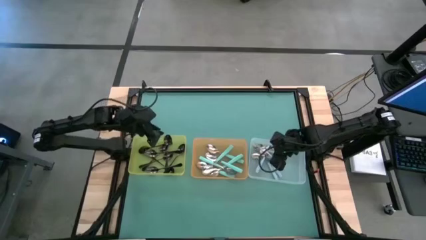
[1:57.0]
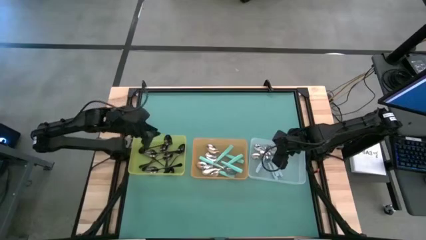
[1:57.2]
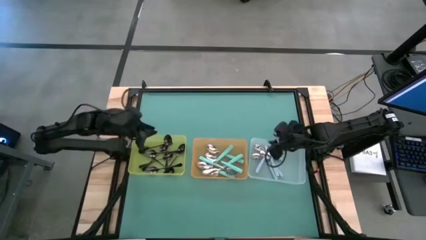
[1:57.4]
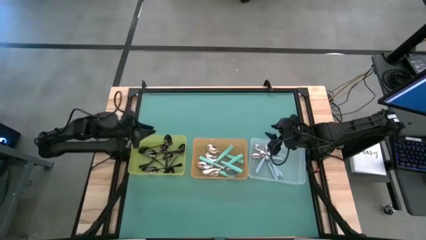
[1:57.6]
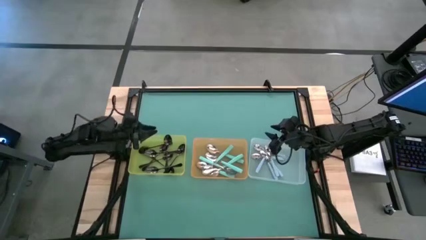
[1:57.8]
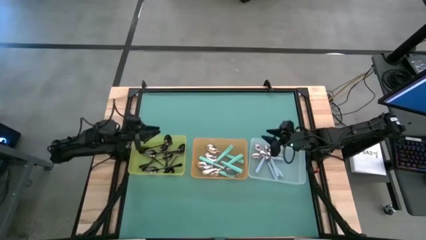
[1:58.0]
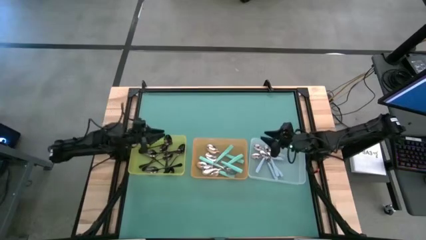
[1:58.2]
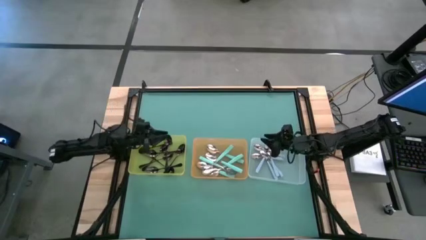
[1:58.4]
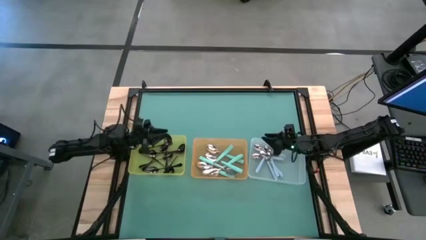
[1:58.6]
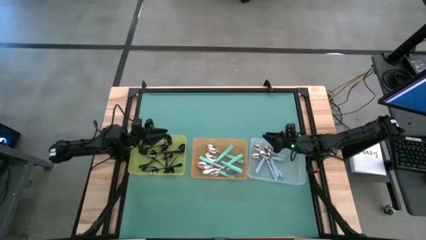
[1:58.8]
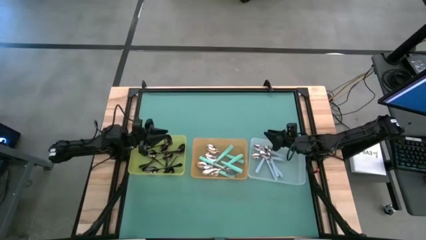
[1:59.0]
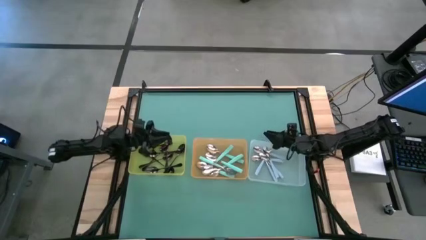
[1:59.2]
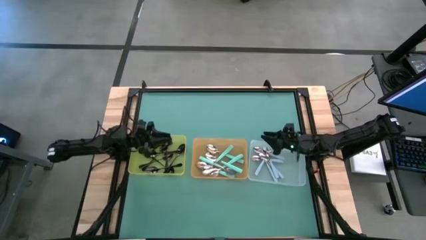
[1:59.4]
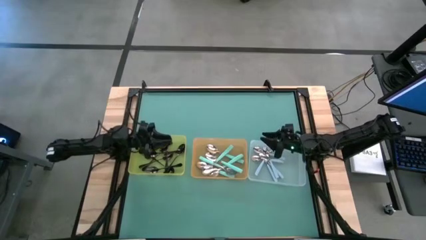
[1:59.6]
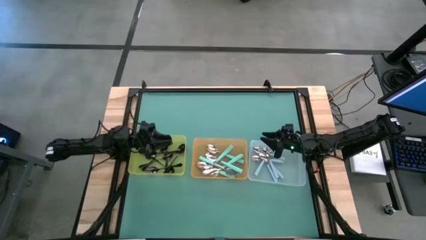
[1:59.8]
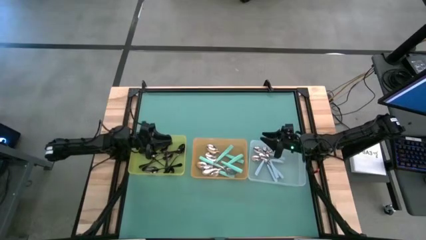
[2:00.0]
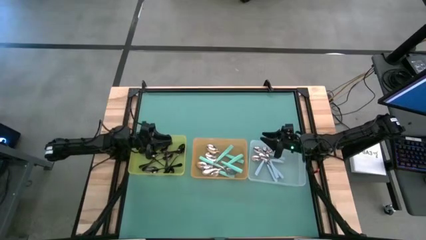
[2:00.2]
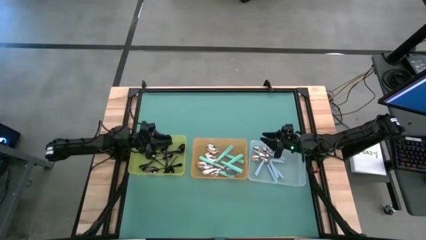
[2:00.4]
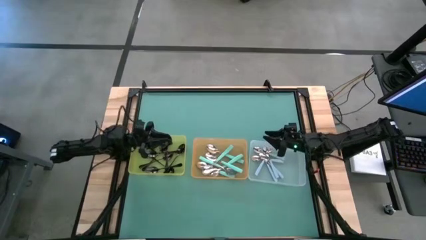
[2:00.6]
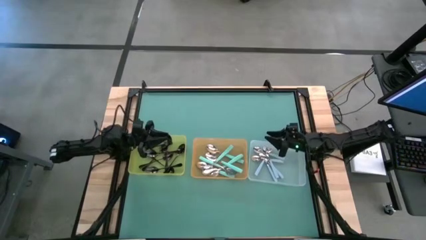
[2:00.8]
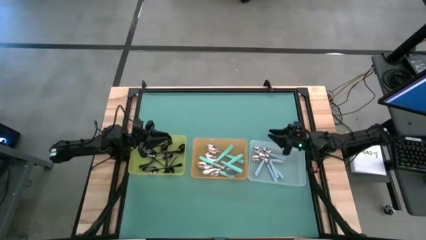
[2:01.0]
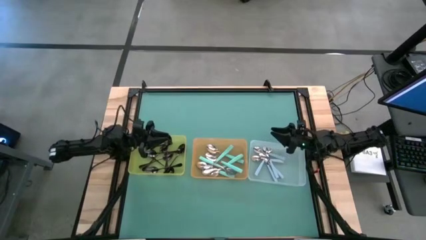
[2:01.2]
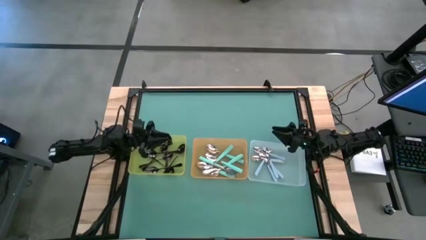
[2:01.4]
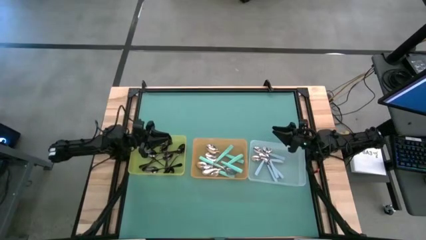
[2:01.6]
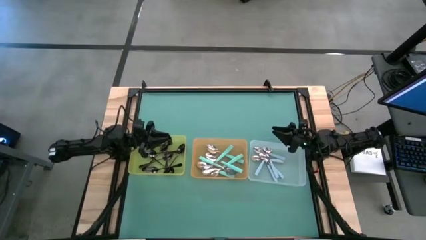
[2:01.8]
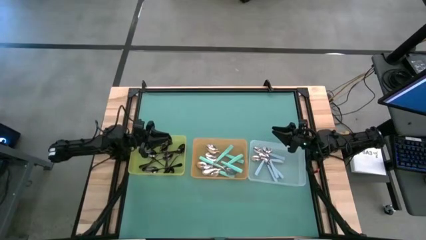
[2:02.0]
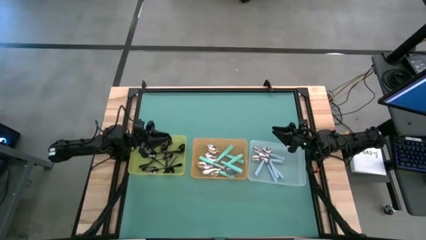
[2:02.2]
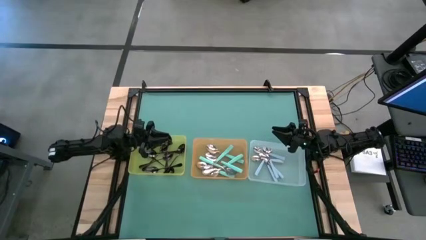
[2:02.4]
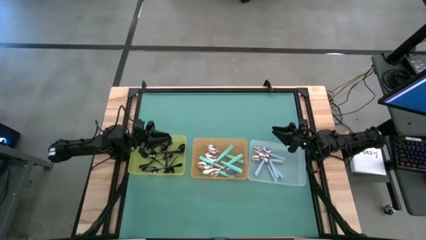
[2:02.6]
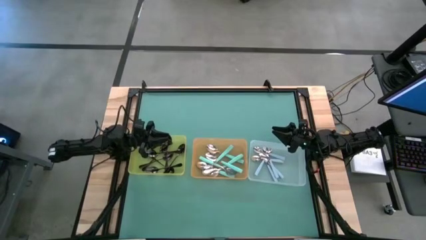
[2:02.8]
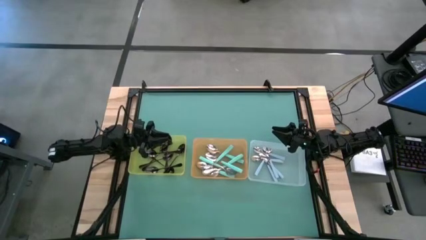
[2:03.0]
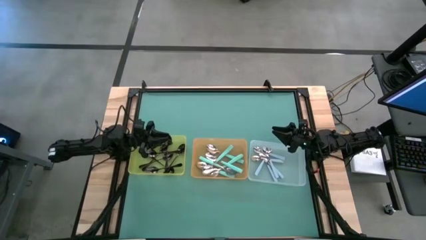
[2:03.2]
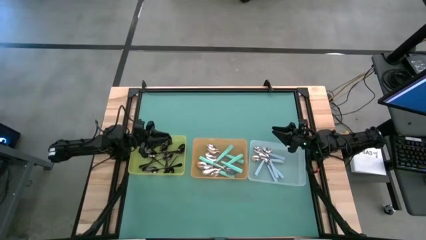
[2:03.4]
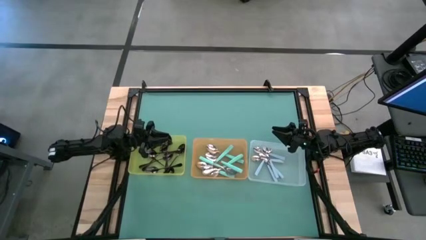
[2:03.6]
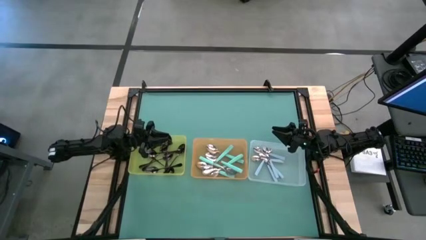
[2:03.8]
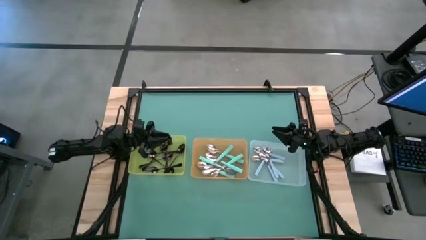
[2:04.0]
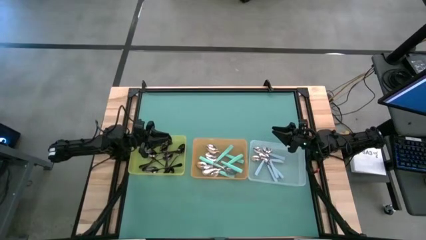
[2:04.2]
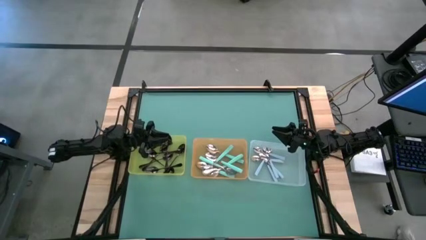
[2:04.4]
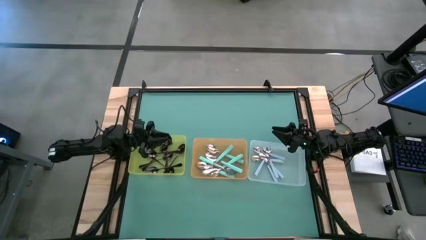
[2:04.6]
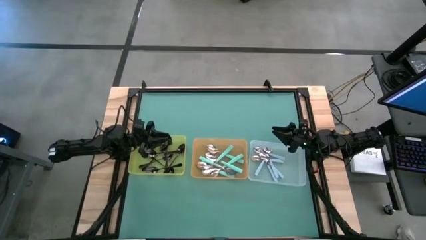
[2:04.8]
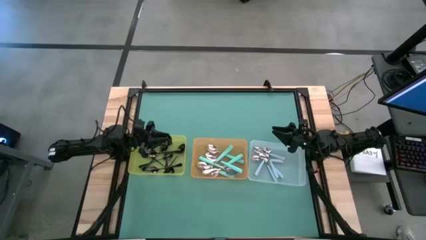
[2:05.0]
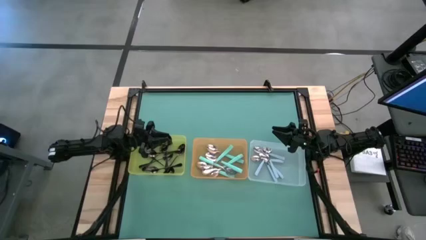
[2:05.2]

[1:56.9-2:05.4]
Task: Sort silverware by color (type)
Return to Home Position

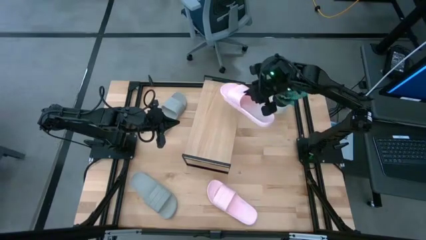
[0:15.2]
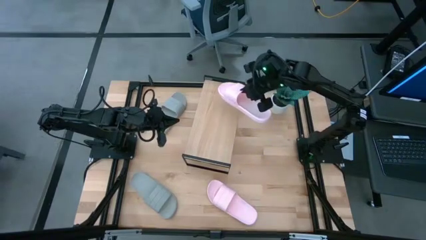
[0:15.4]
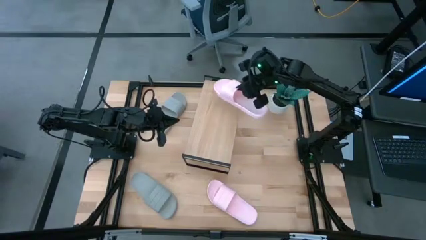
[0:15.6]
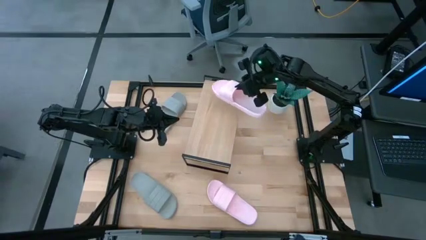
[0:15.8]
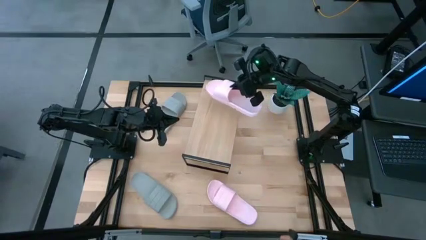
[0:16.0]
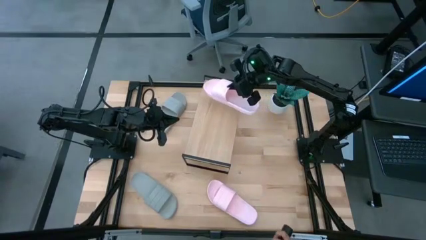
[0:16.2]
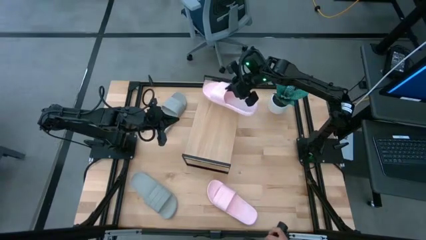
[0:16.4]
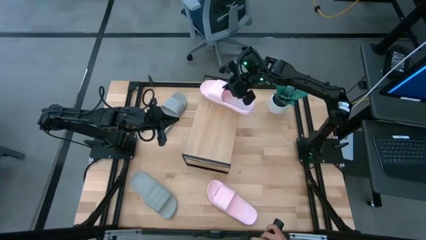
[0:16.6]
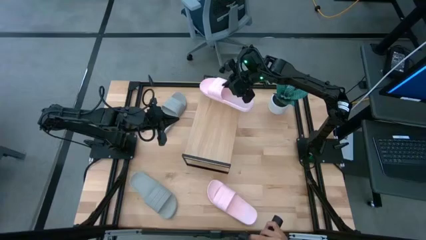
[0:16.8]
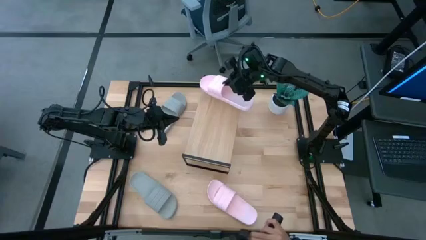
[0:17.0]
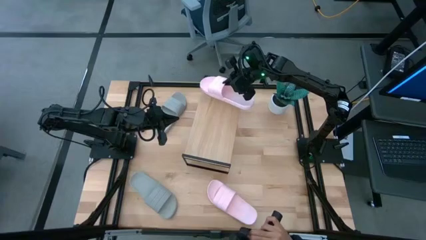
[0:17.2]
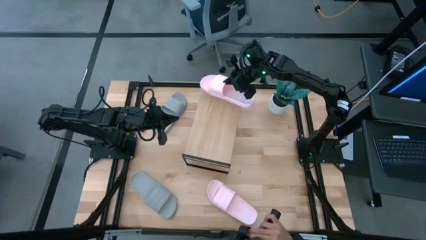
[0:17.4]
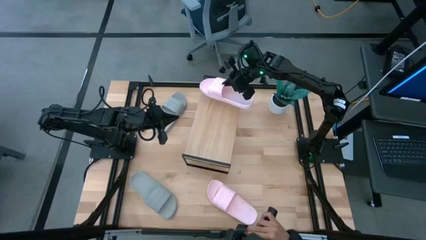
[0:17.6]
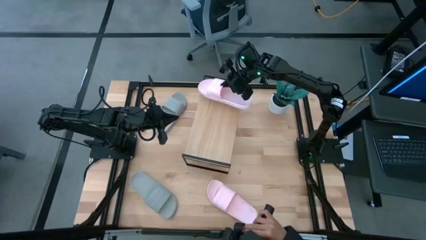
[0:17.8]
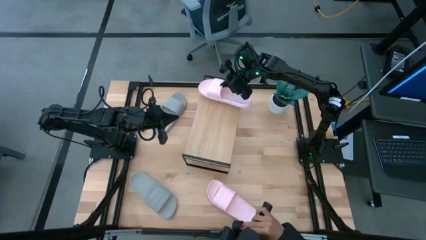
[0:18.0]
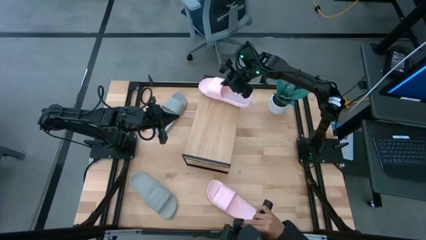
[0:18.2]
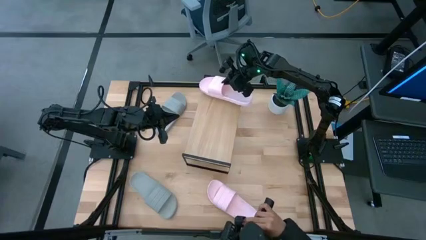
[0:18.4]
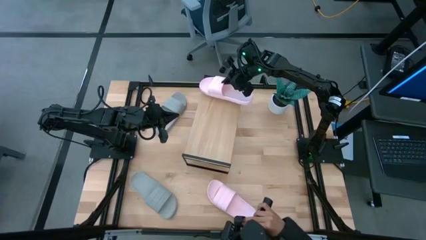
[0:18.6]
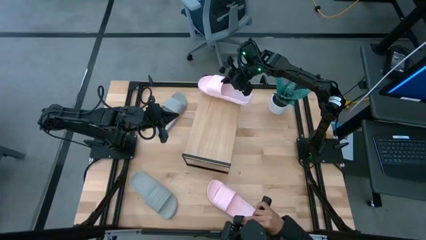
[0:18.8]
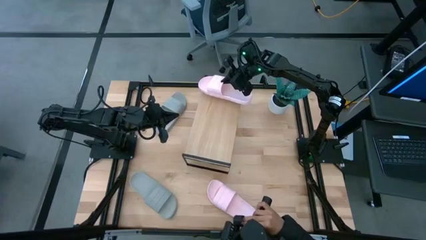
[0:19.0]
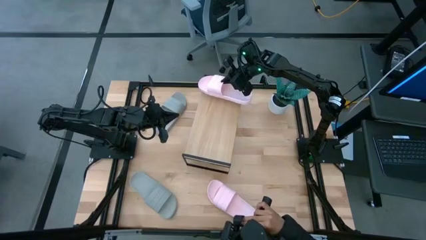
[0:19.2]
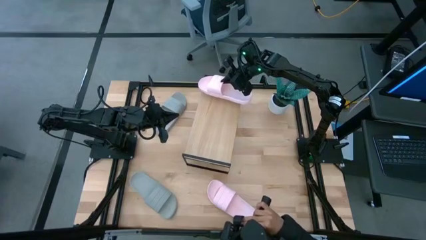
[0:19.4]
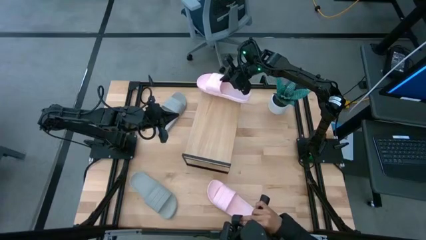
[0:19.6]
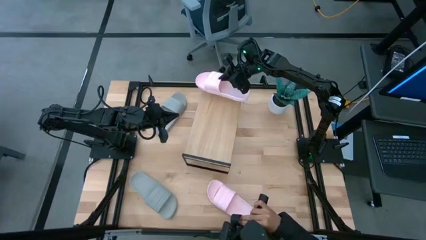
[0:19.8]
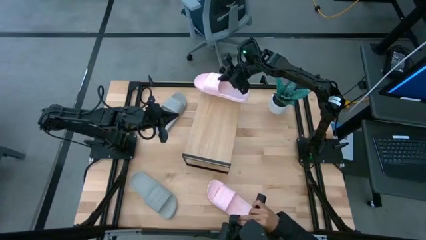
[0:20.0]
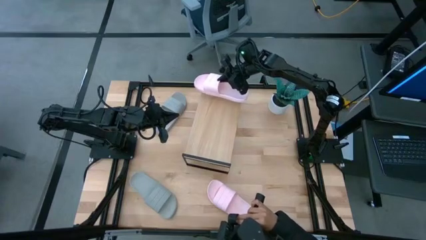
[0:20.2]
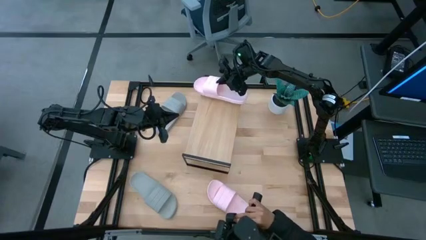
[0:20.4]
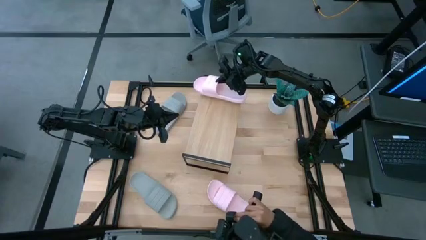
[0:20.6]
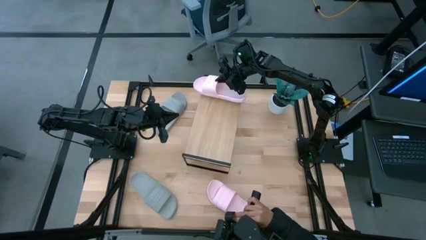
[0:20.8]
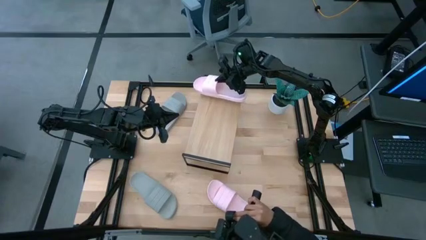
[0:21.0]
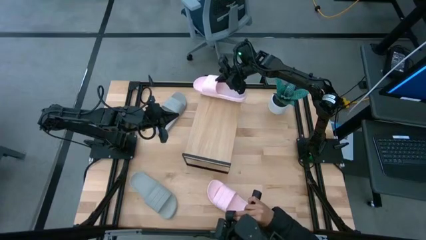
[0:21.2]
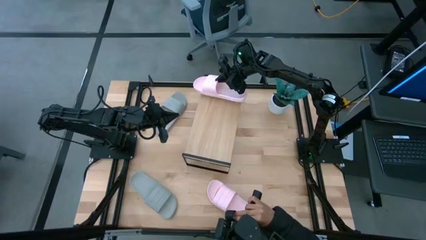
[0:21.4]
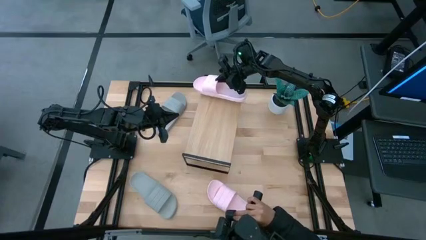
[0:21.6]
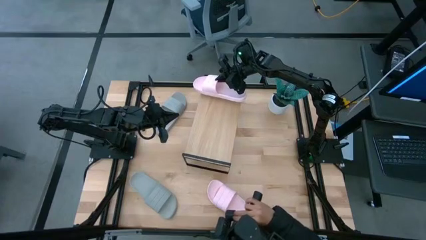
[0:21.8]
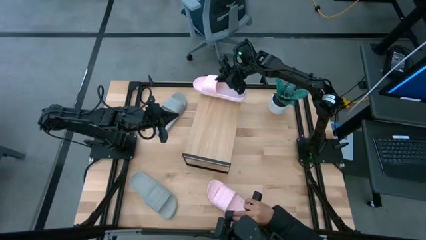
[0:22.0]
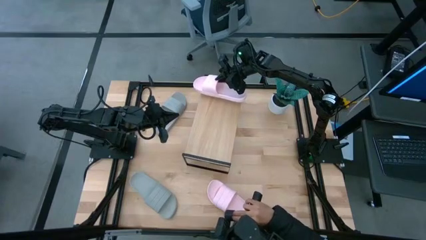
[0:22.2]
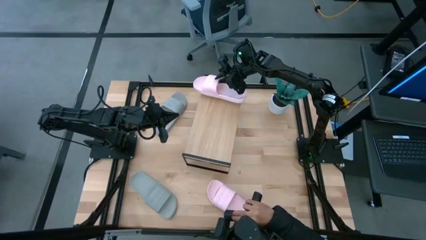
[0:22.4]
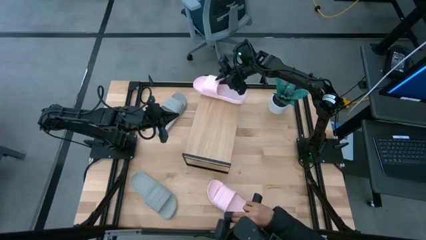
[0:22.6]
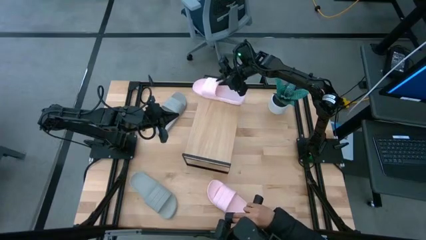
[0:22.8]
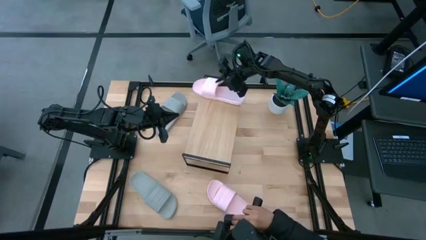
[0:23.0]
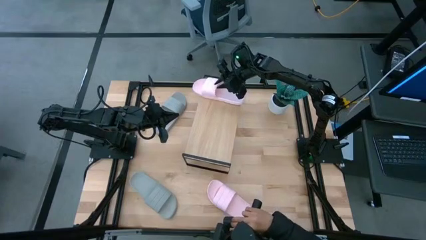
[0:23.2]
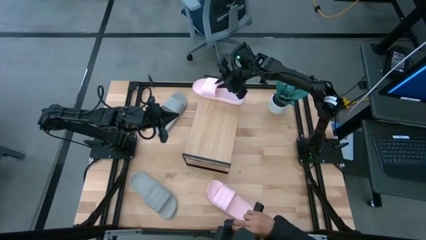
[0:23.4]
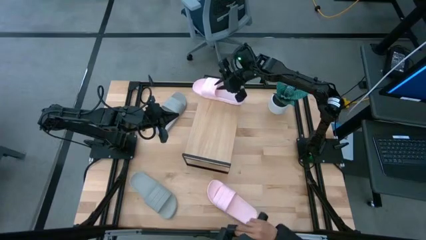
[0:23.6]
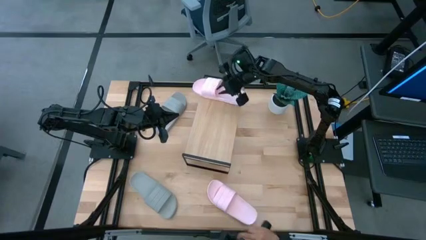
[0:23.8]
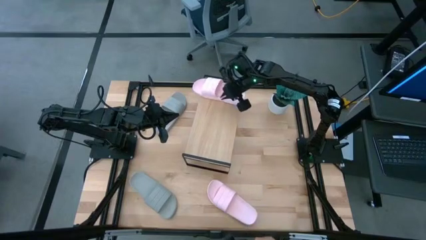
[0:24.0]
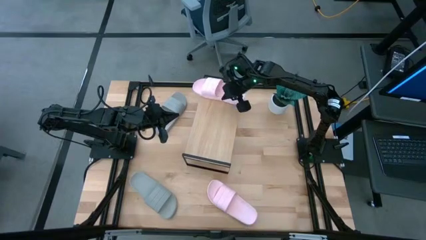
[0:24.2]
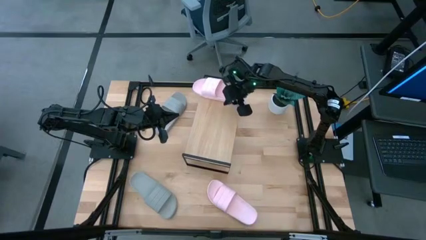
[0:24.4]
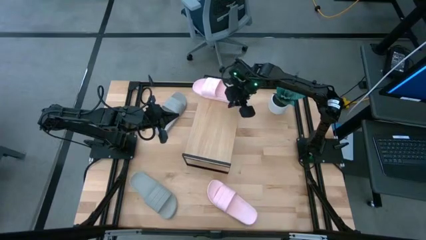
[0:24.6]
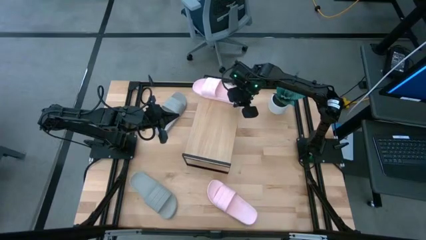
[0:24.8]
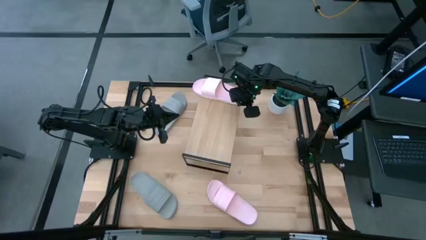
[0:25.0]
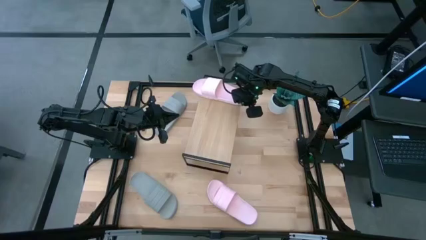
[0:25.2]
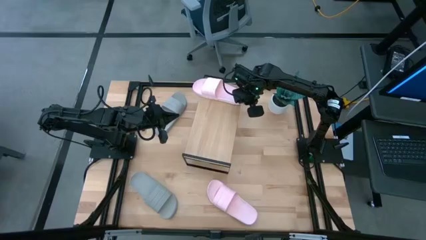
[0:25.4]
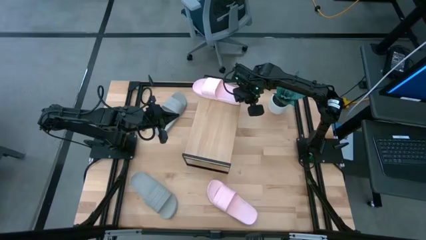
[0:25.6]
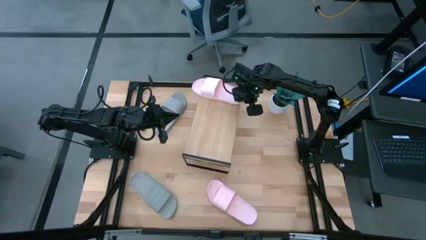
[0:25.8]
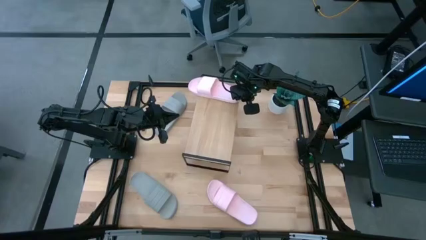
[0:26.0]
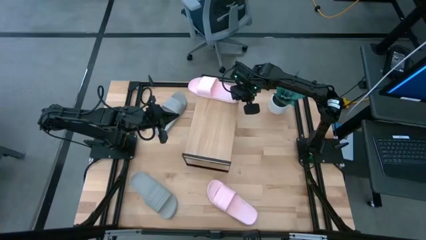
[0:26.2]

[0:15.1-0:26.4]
Task: Pick and place slides into the shelf
Put the right pink slipper on the shelf
